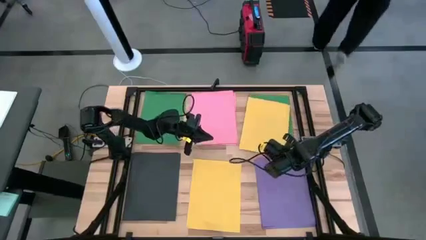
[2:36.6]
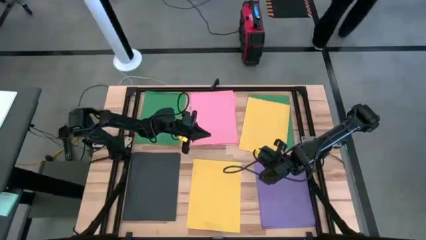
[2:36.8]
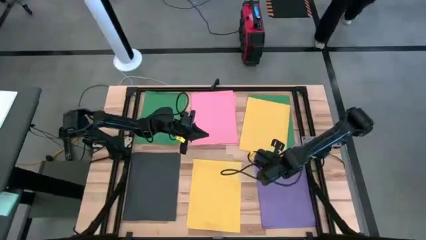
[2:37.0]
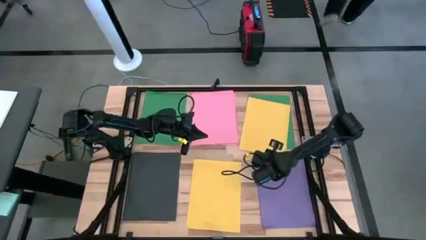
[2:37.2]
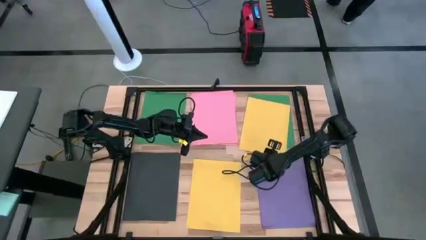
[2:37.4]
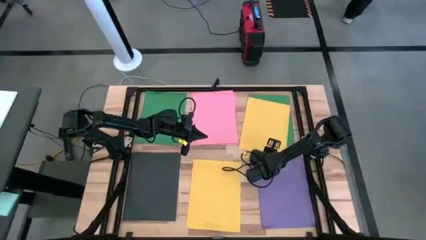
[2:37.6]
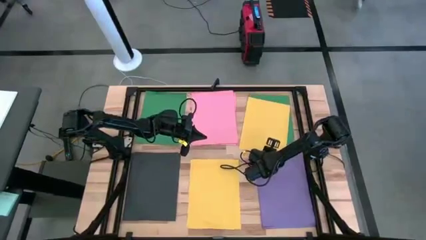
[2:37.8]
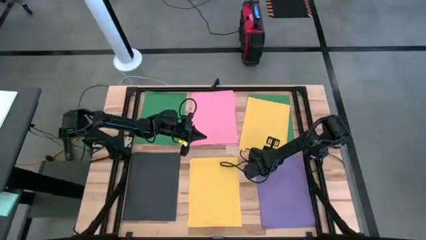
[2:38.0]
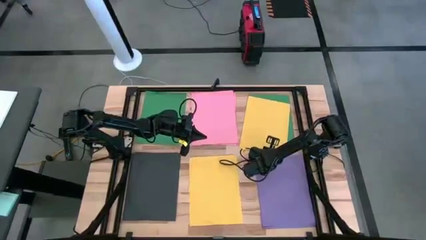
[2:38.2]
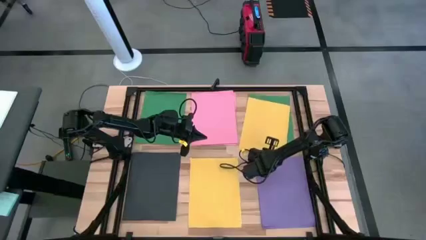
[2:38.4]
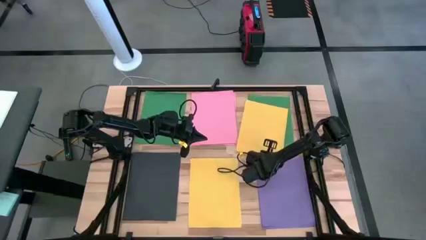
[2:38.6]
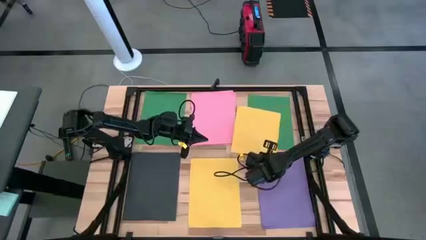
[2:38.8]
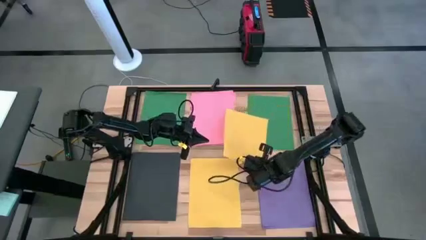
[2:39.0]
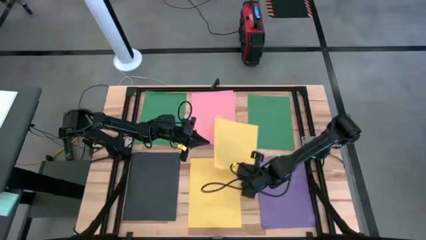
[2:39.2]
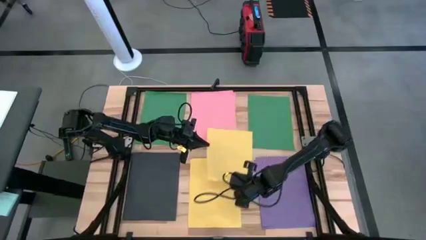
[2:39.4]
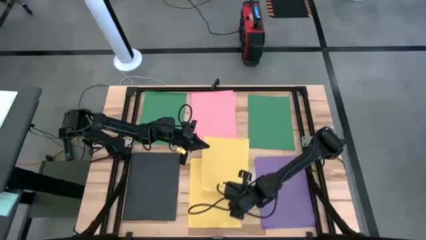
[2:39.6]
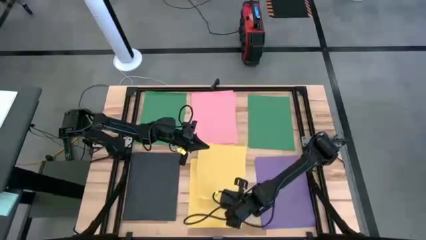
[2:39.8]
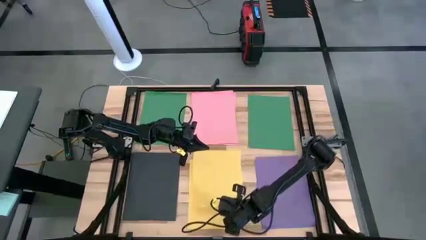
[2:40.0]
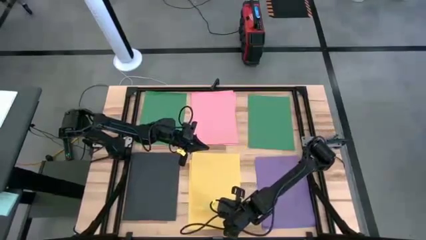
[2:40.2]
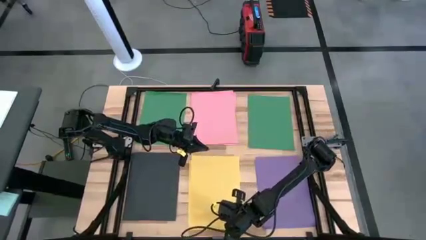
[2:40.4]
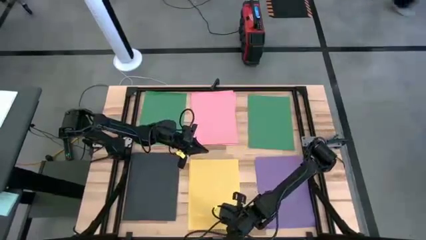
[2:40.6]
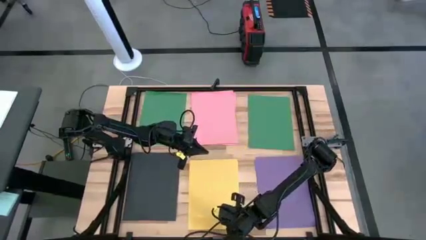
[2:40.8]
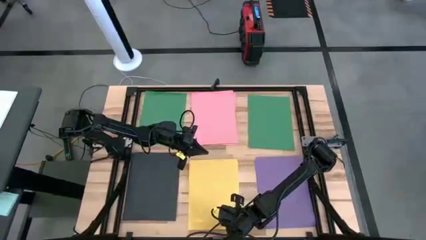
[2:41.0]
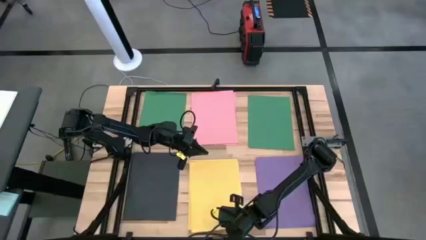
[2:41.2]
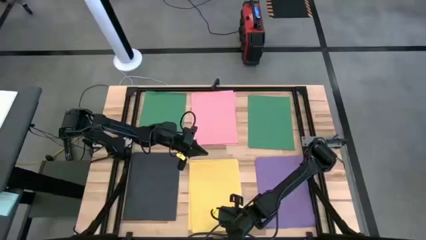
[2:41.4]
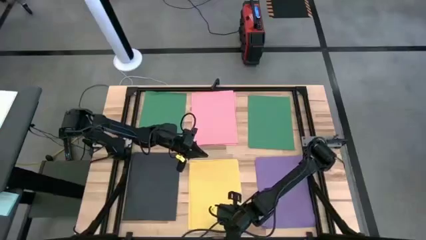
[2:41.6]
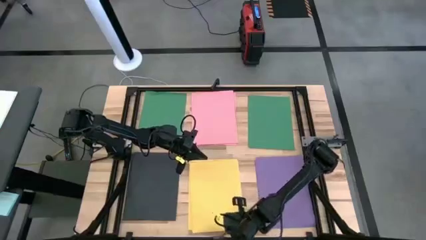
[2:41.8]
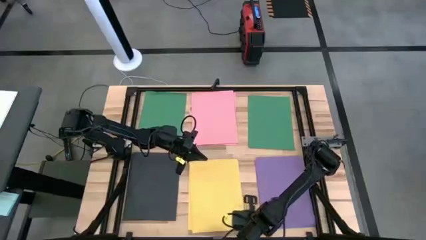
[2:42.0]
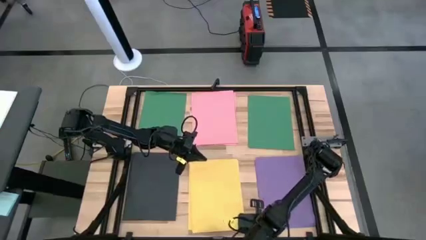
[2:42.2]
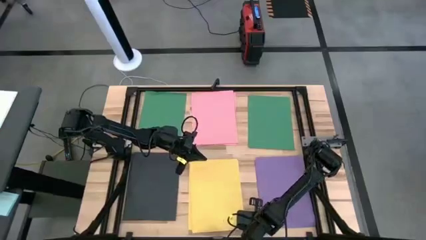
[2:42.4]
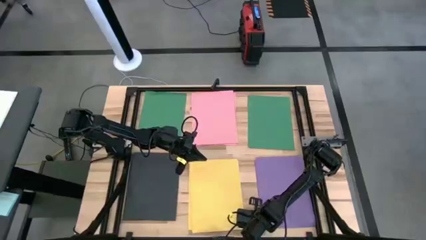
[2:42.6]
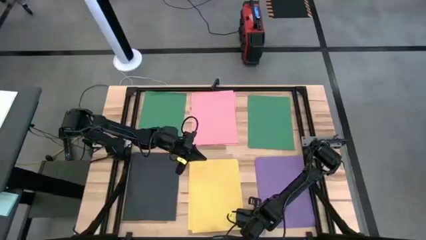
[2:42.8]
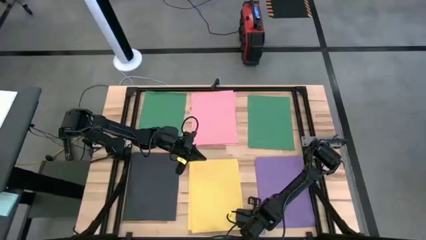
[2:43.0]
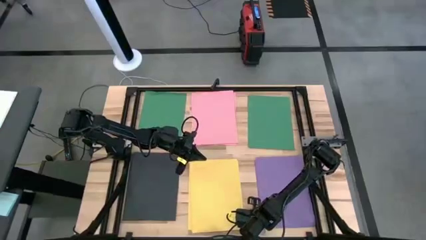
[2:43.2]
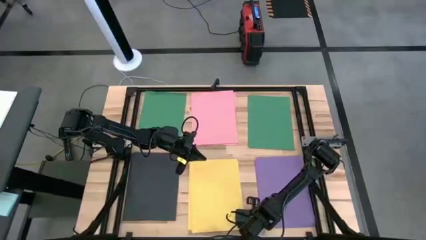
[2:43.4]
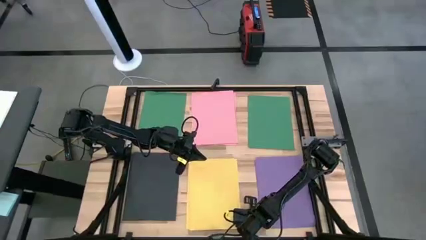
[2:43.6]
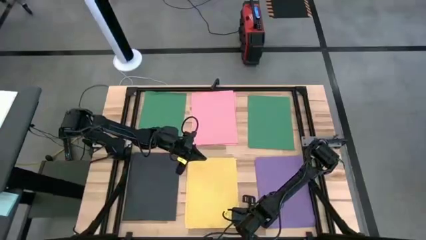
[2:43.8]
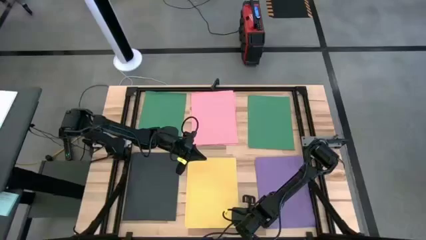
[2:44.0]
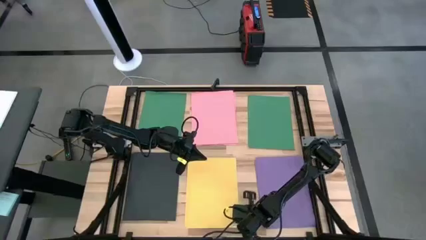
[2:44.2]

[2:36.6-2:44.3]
Task: Organize paper
Stack the yellow paper on top of the yellow paper

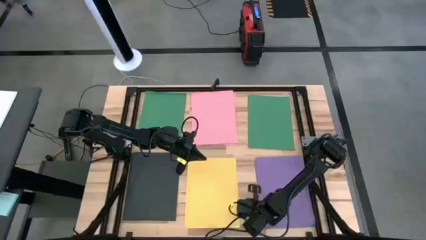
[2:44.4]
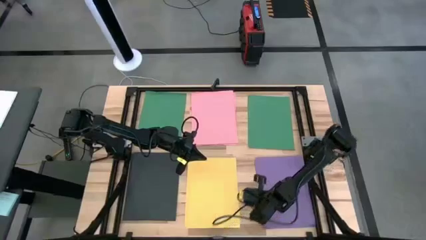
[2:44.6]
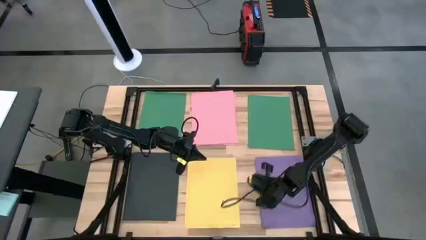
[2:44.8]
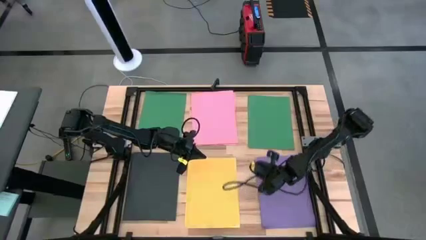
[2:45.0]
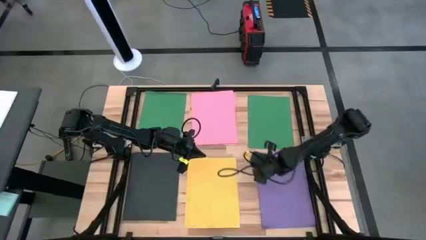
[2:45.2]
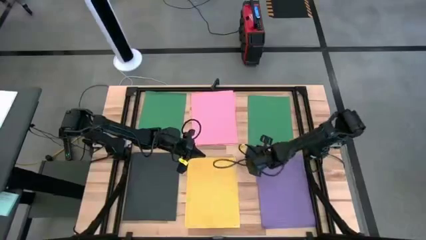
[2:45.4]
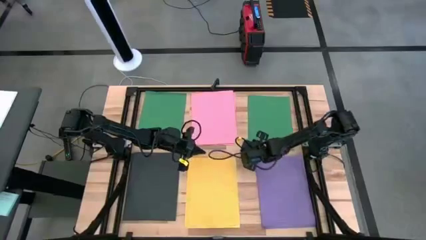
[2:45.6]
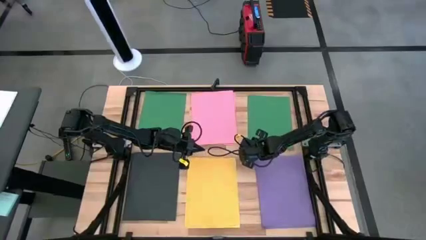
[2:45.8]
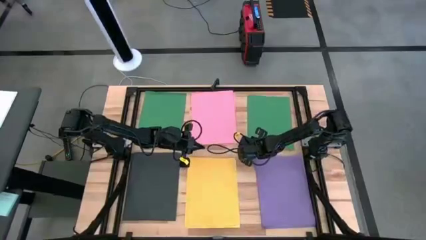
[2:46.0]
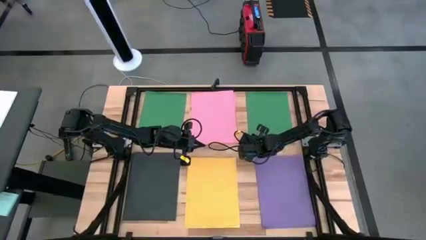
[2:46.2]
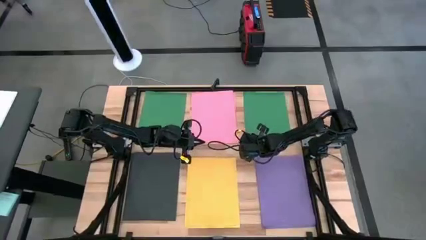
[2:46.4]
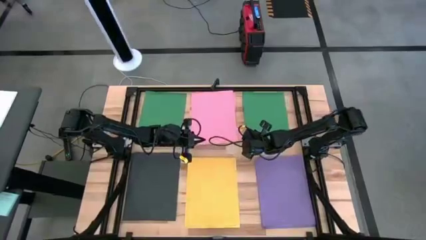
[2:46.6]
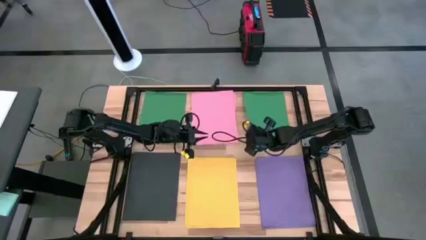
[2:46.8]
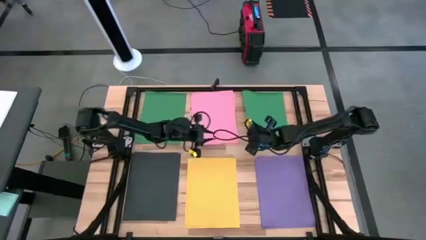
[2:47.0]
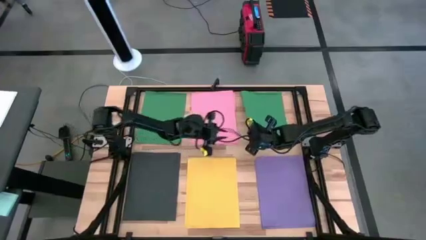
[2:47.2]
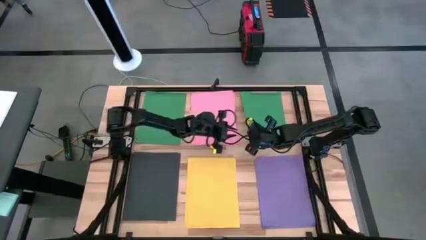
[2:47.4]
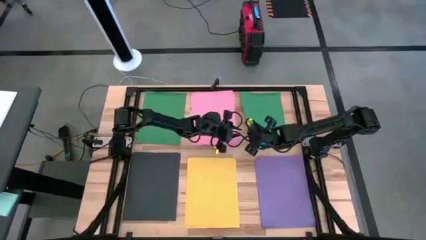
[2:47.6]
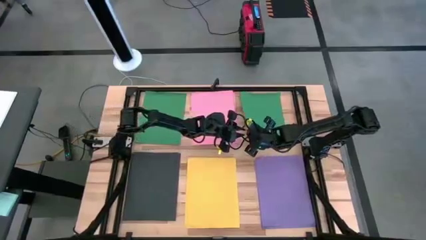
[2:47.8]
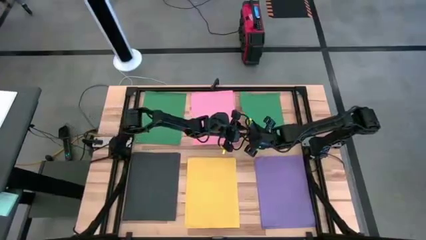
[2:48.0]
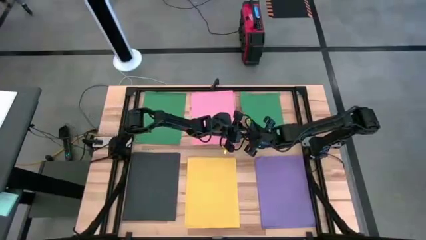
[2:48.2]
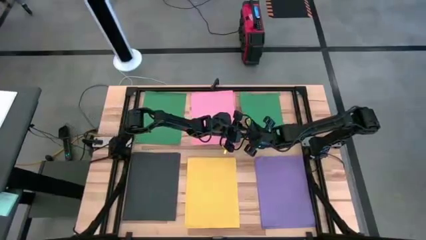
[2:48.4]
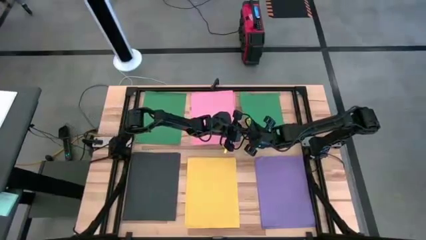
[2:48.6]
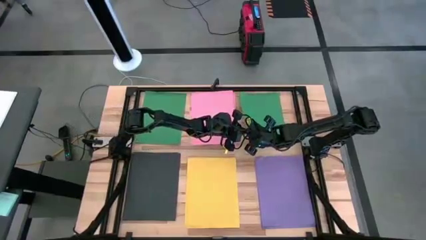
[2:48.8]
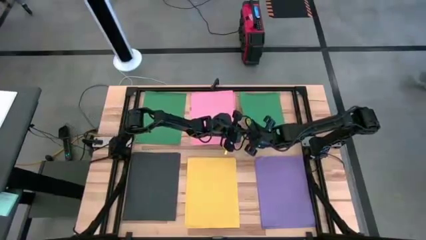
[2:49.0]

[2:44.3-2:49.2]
Stack the green paper on top of the green paper
